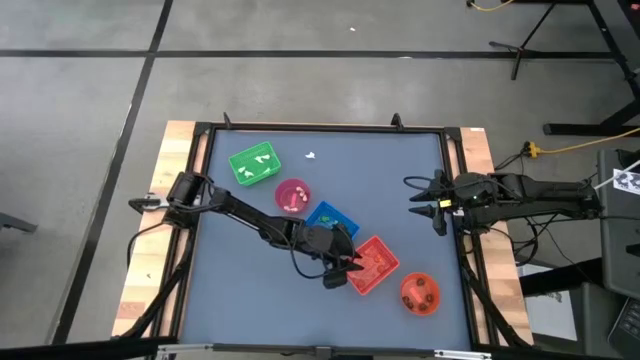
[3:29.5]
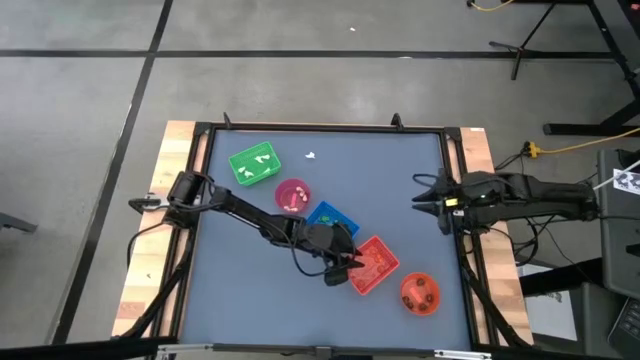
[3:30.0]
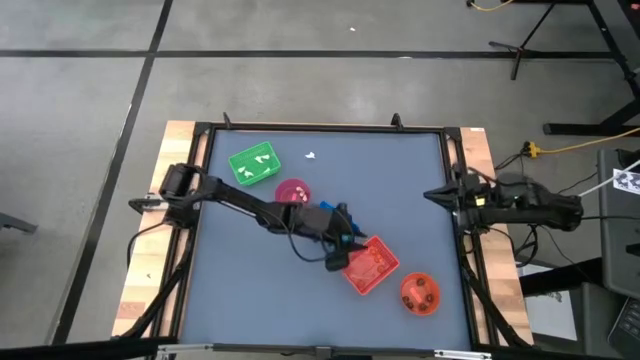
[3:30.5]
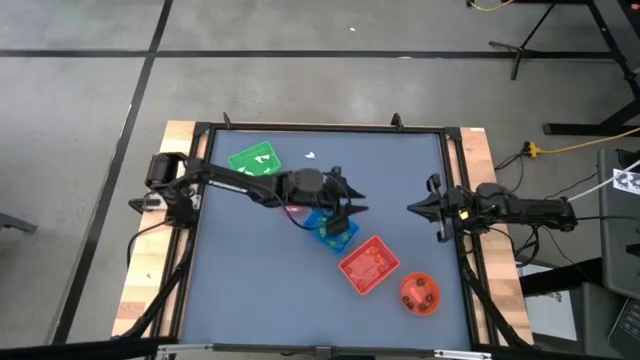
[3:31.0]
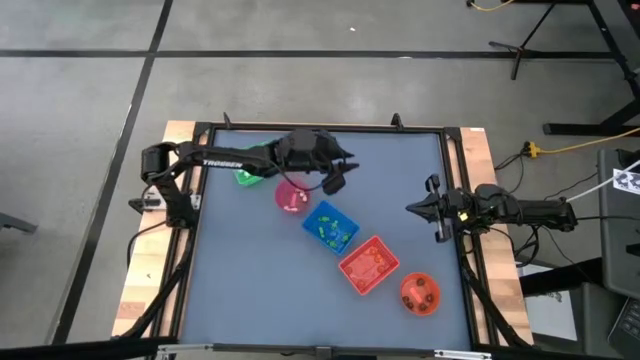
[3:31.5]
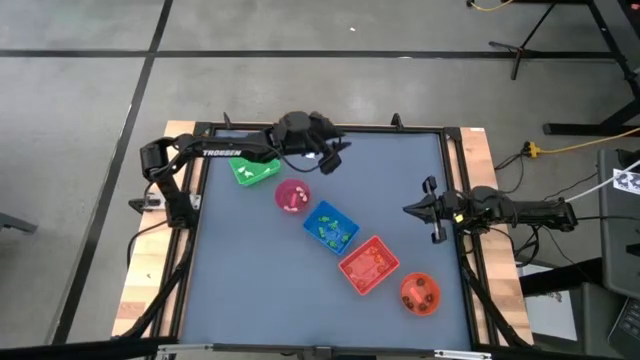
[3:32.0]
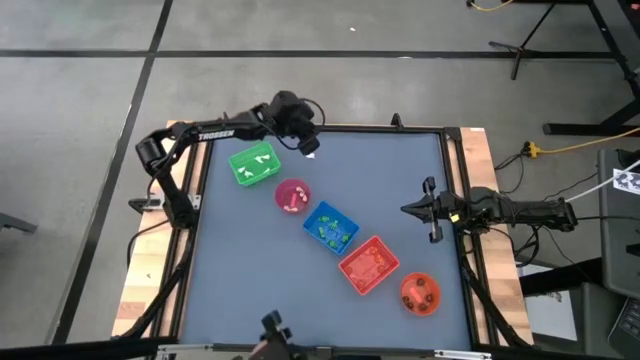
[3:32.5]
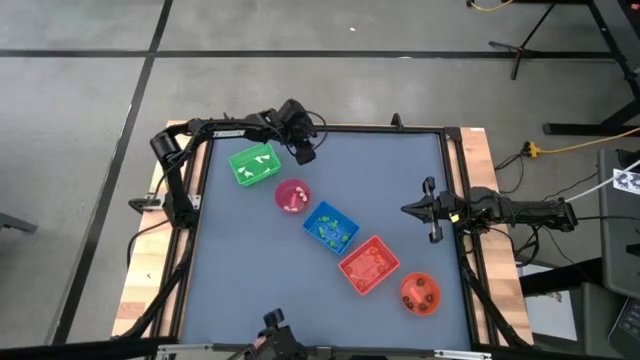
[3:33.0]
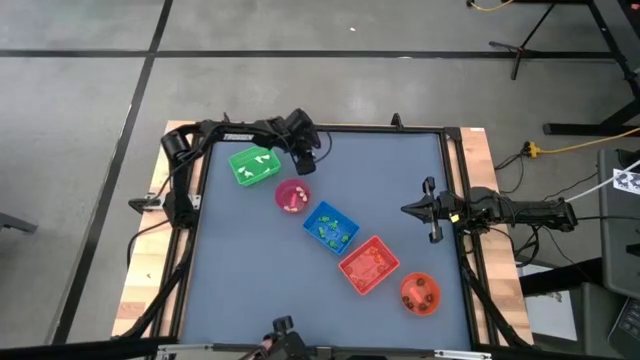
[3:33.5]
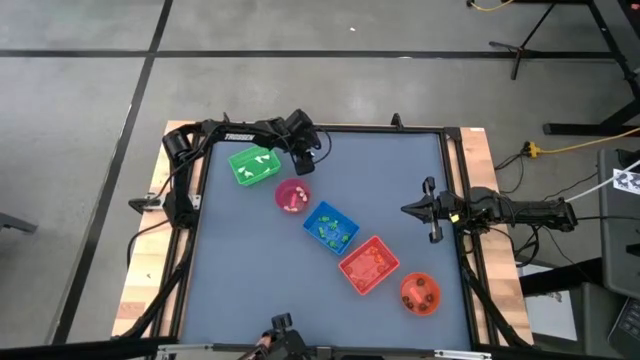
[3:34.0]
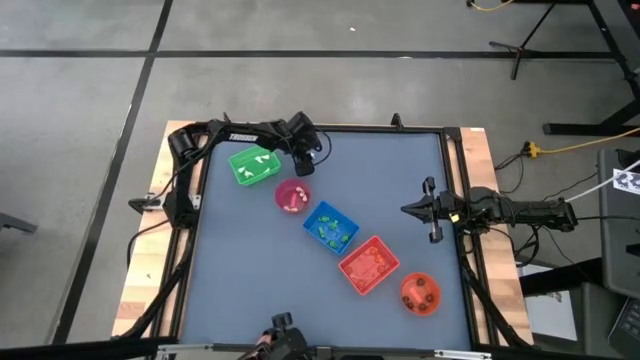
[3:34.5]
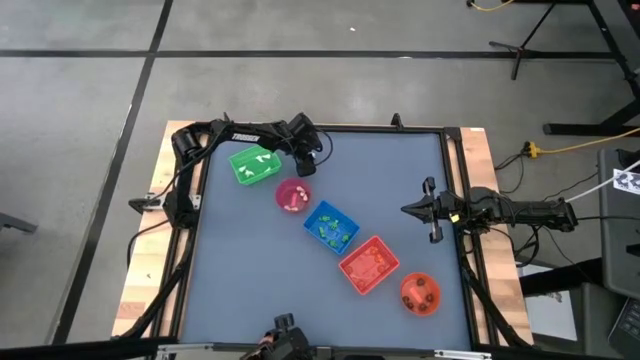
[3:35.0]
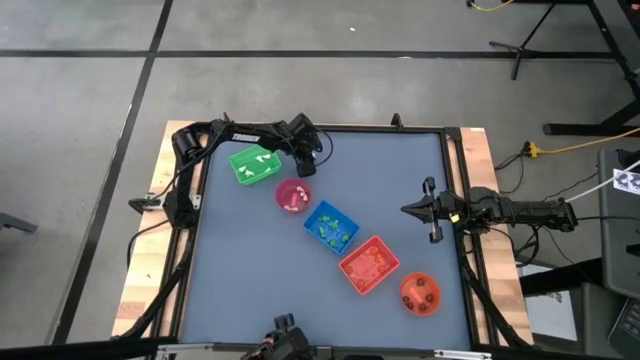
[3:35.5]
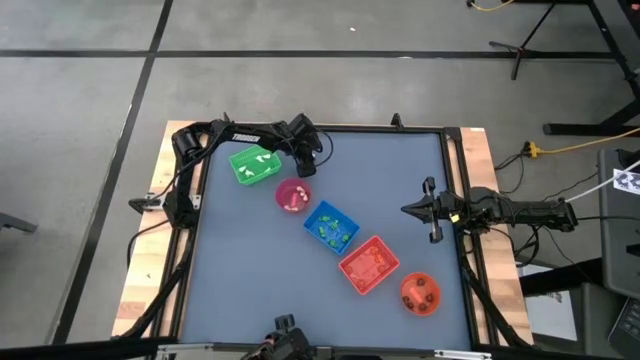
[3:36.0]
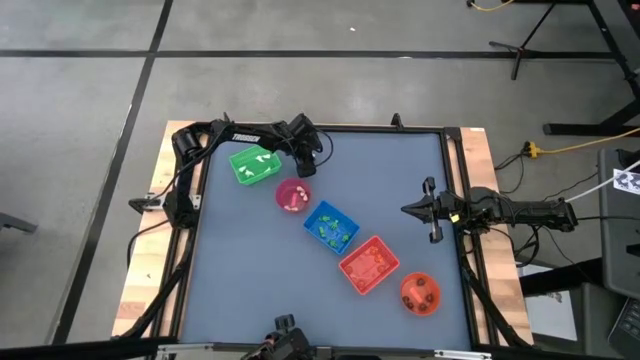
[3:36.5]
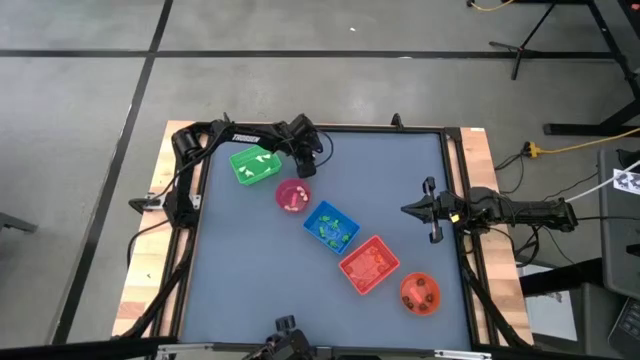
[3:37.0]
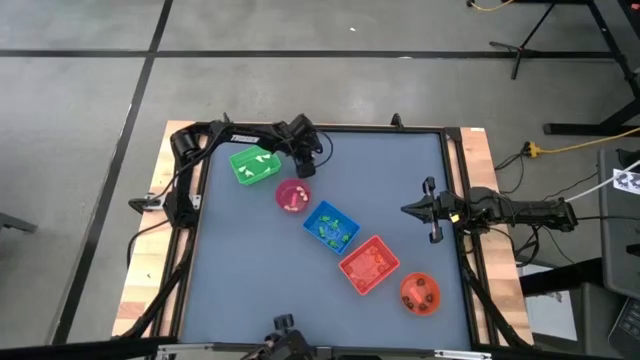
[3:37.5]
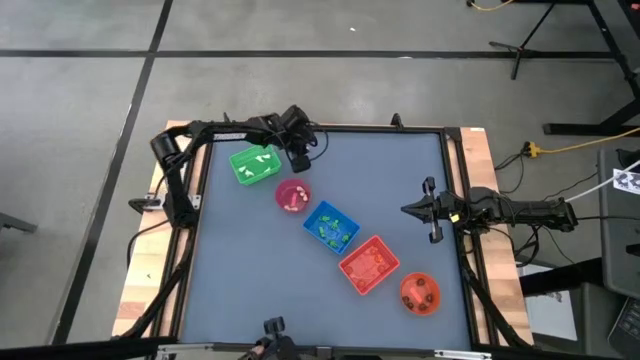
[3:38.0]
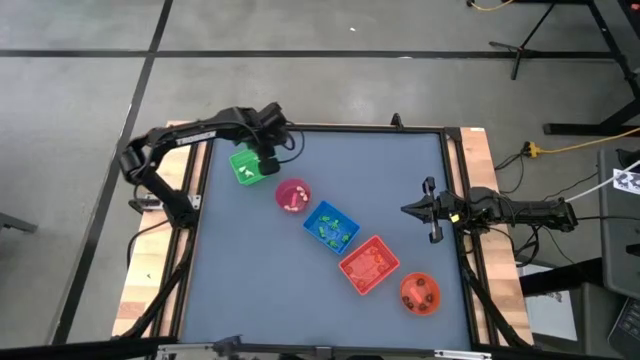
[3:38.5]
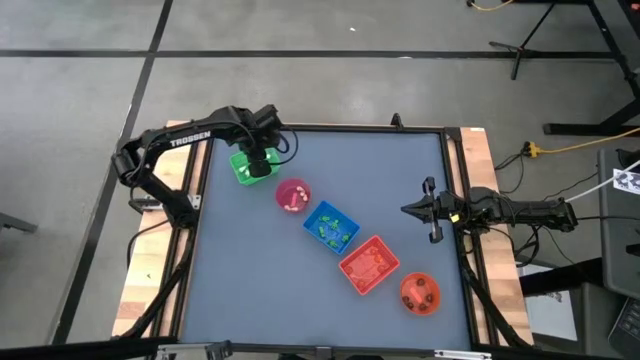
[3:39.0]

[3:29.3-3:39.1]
Task: Sort Halloween decoration
Put the white ghost toy into the green bin

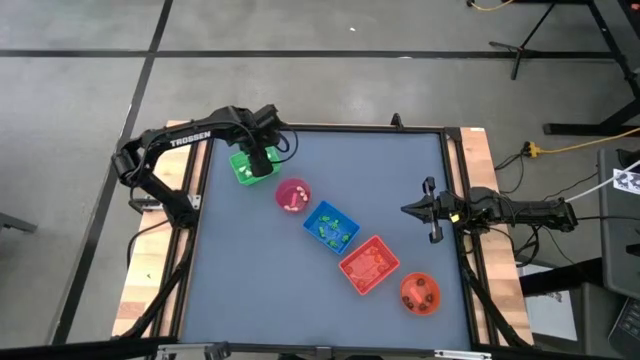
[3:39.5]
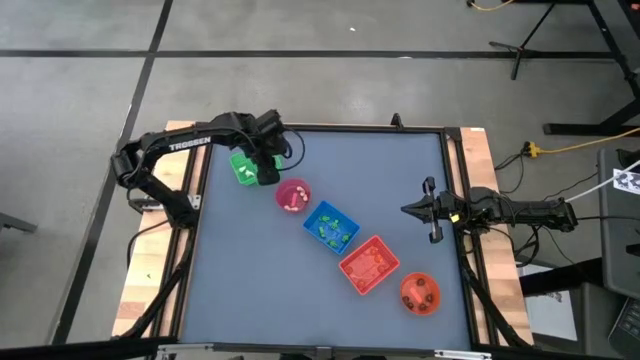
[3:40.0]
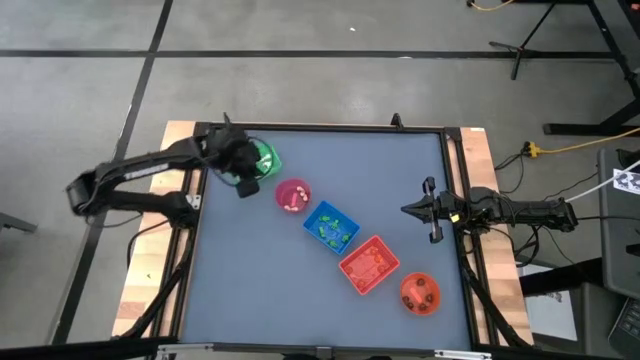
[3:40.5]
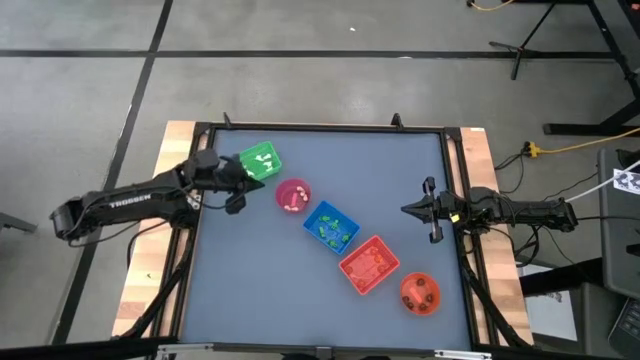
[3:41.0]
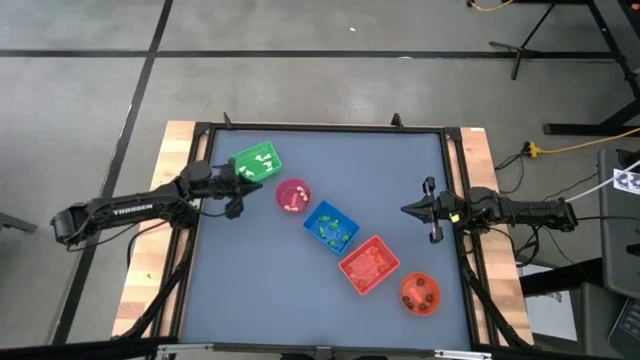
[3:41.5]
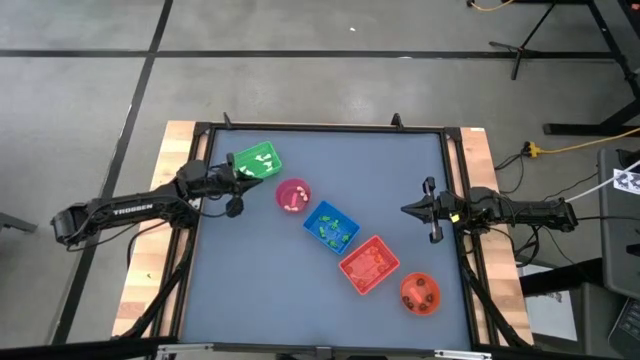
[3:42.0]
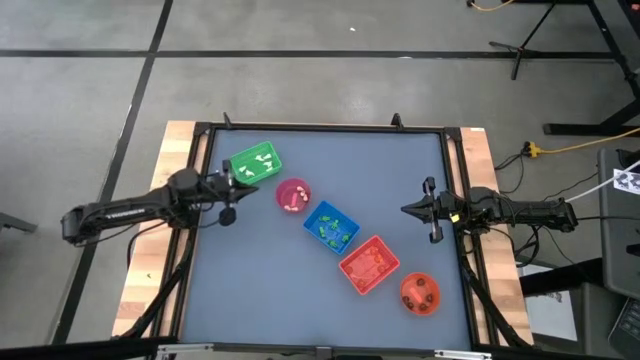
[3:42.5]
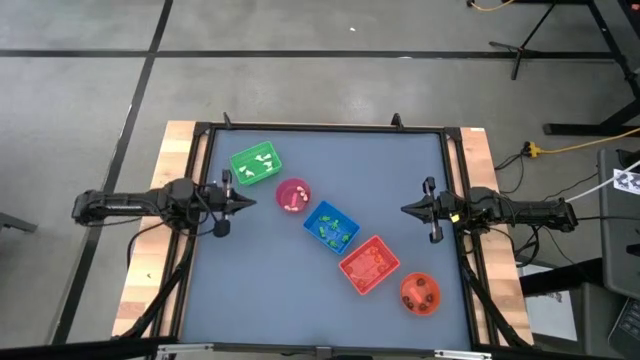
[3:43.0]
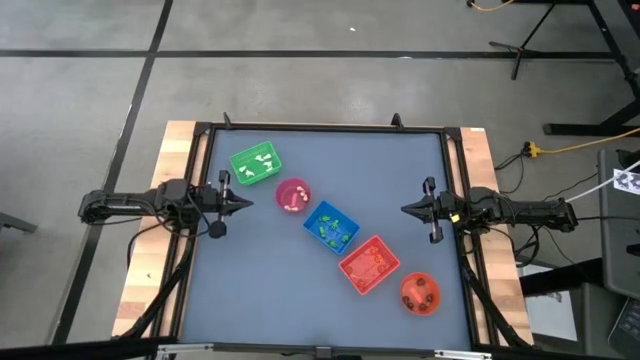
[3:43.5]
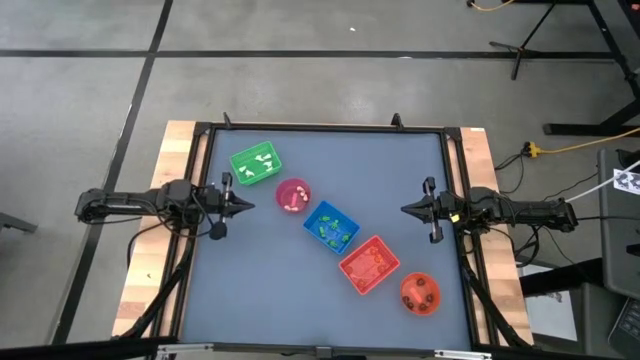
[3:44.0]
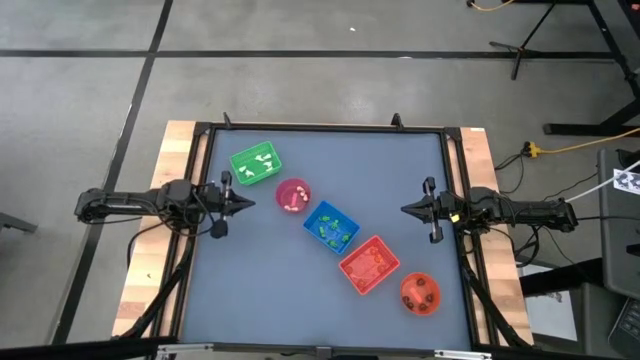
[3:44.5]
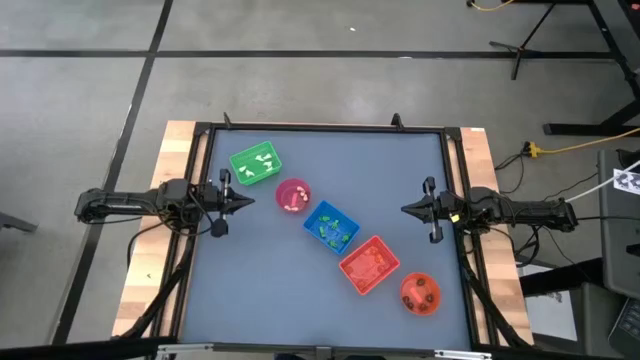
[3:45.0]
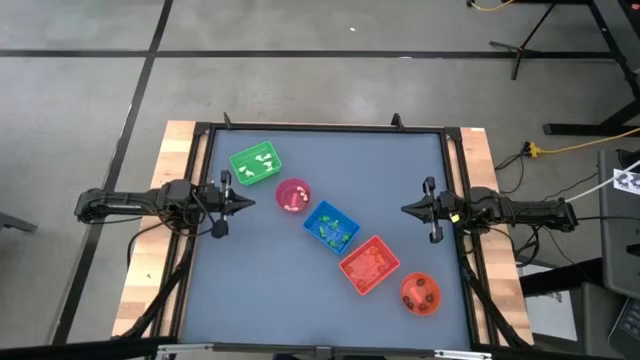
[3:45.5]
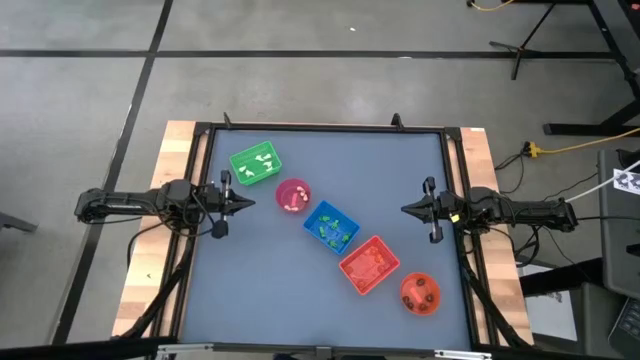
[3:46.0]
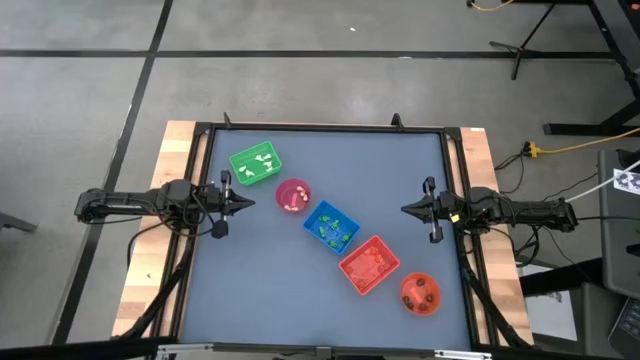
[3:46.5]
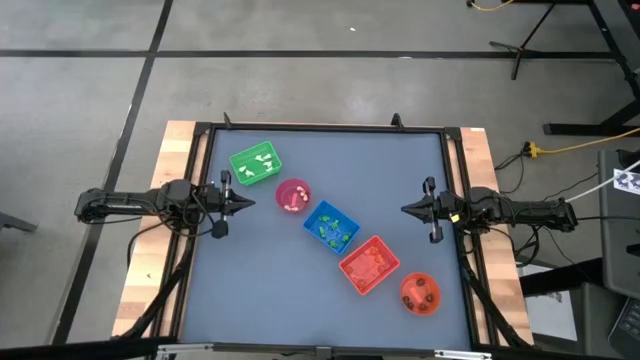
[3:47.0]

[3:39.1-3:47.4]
Return to Home Position

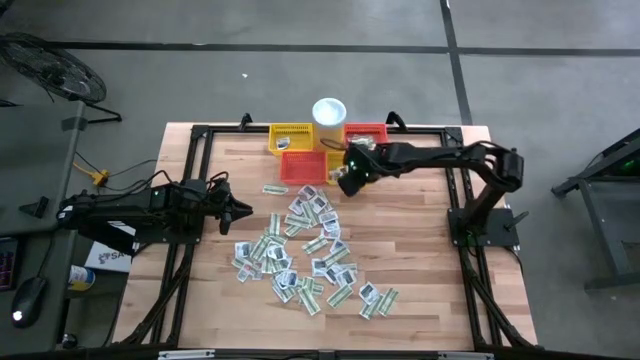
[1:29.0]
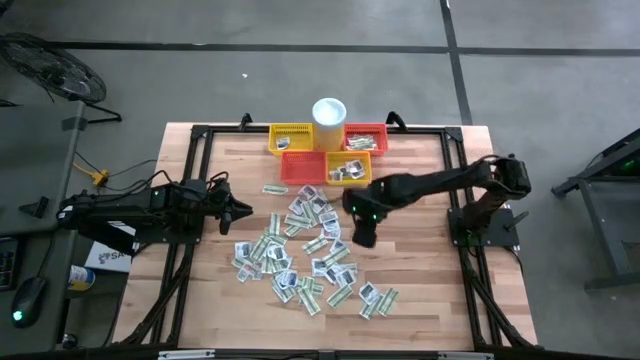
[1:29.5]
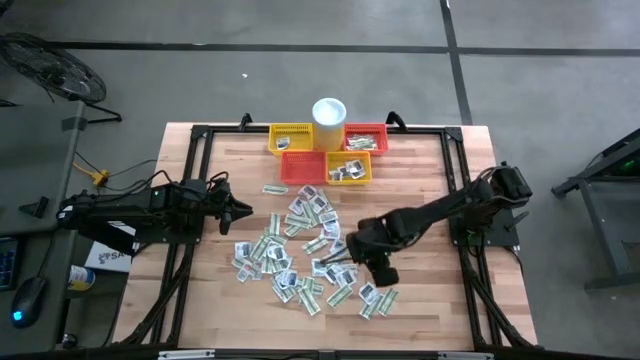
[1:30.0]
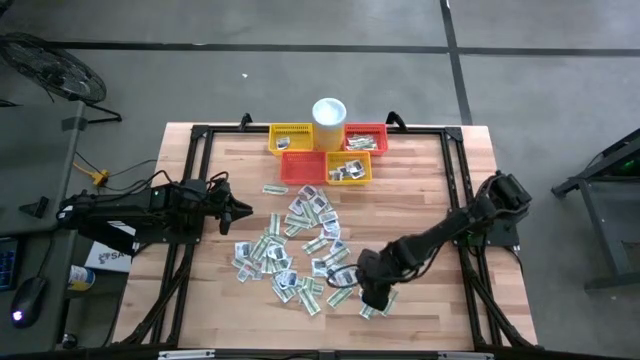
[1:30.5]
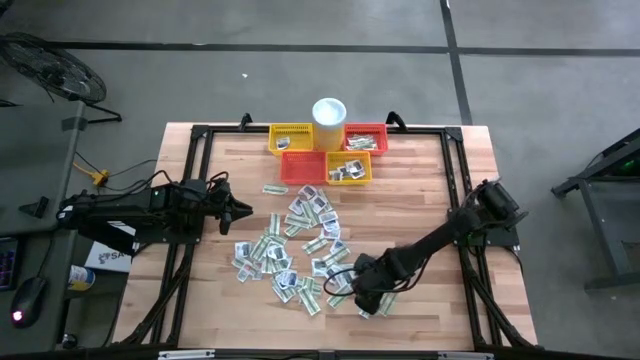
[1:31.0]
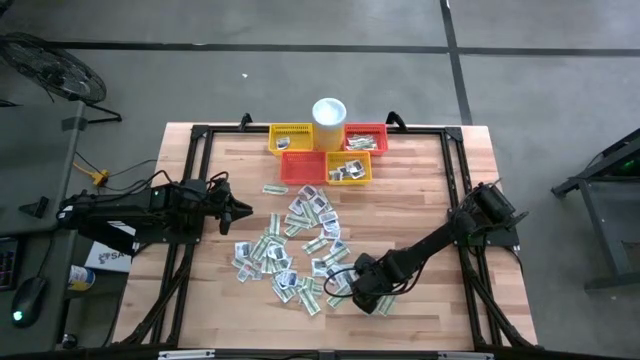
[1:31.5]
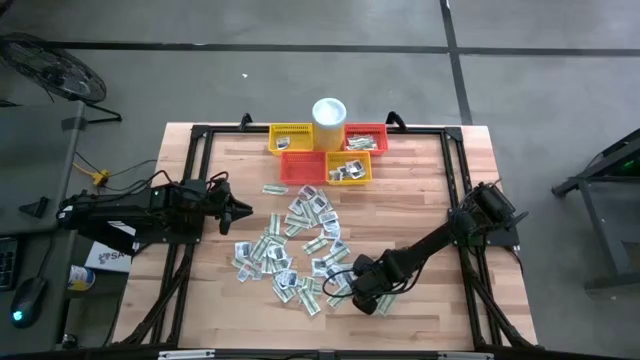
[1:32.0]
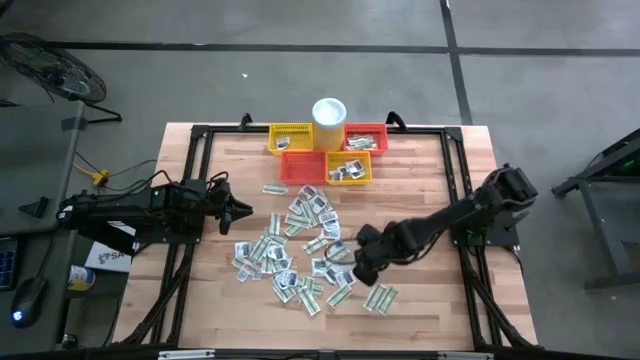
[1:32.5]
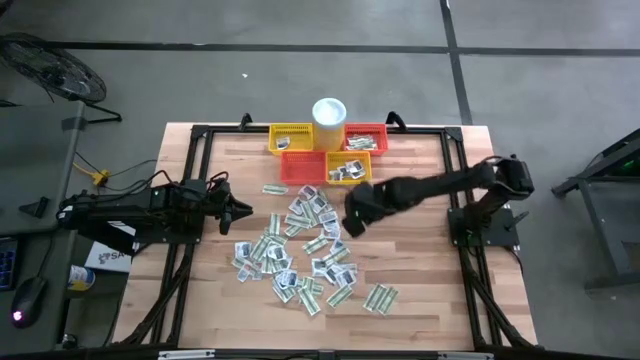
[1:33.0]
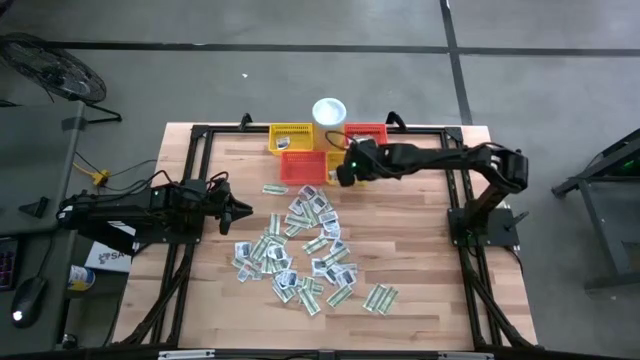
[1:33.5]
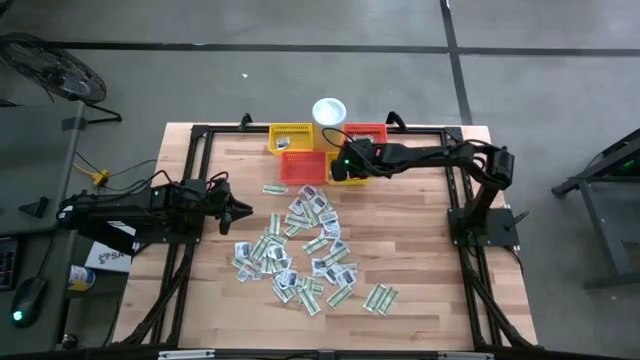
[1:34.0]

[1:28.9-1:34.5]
Task: Pick & Place First Aid Supplies
Put the black towelette pack into the bottom yellow basket
